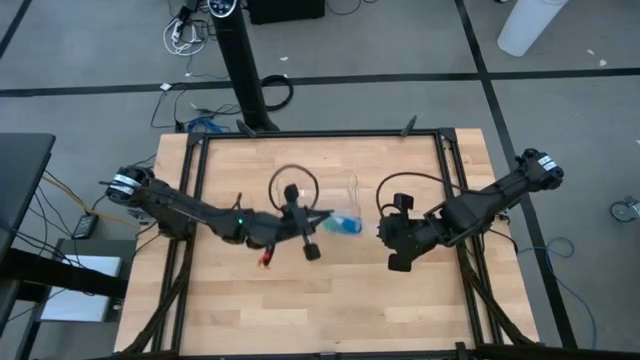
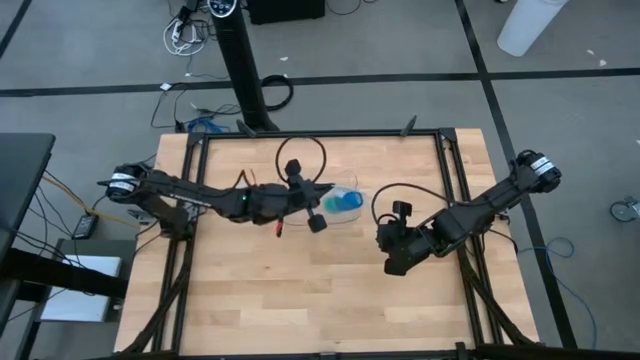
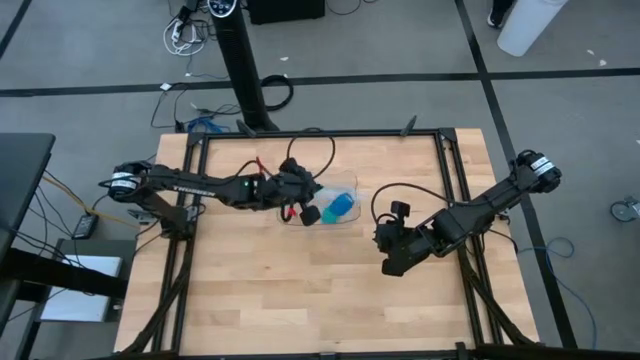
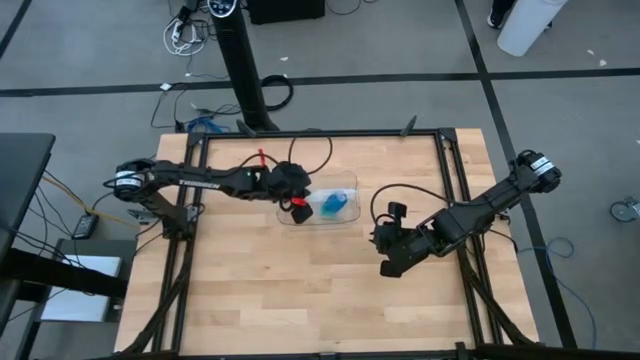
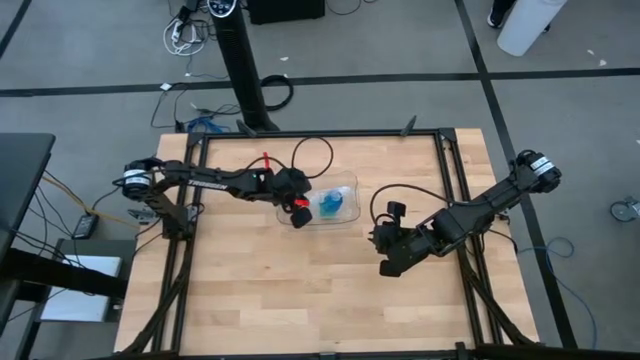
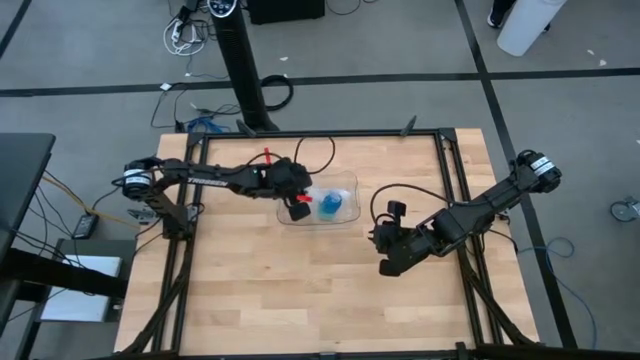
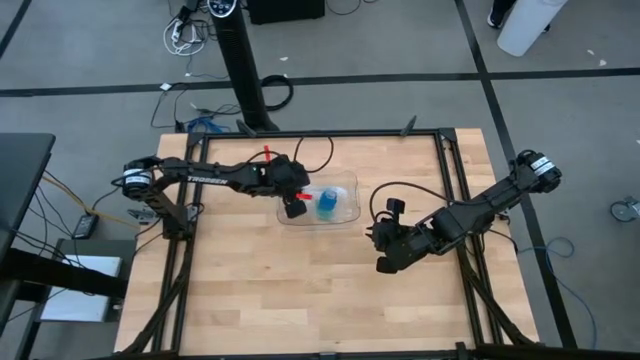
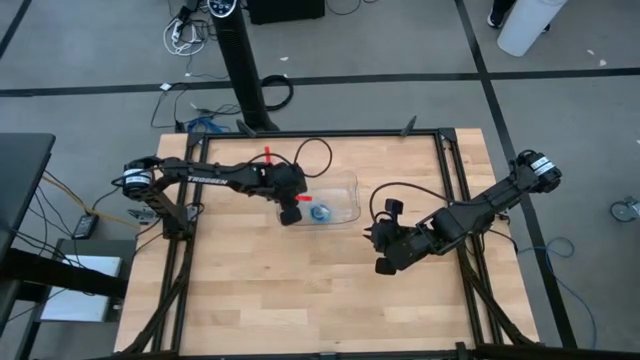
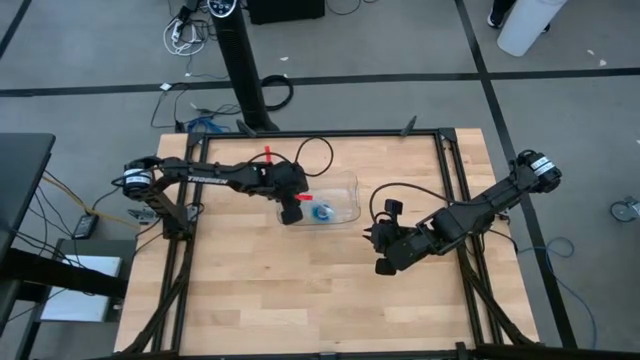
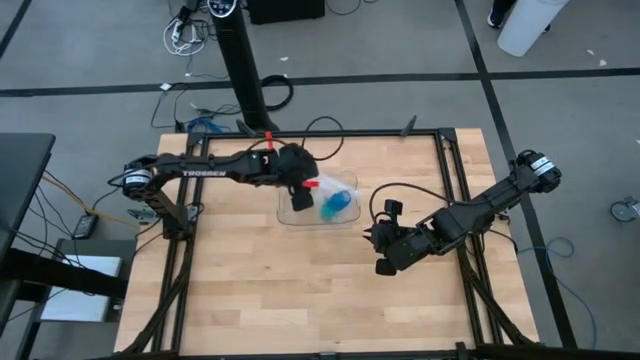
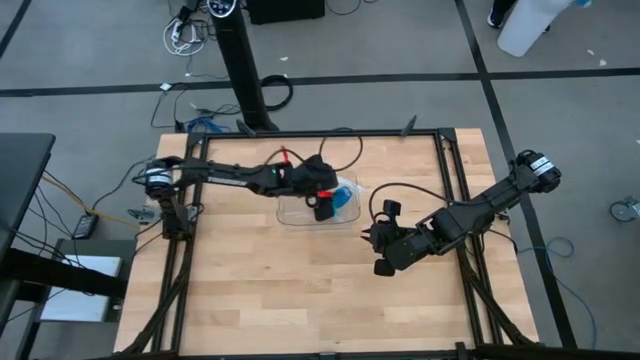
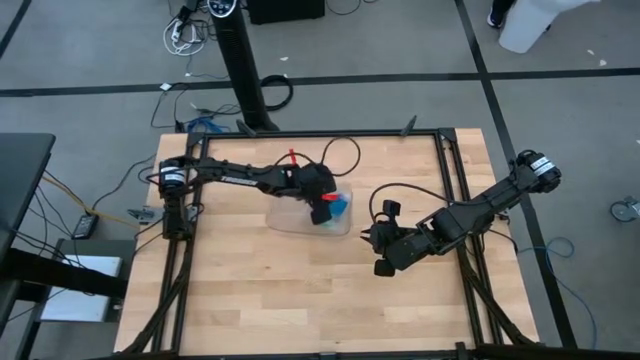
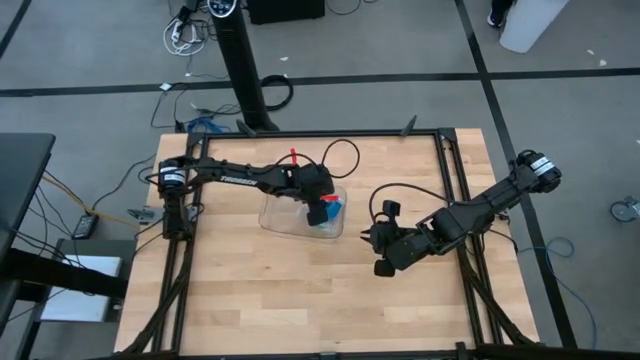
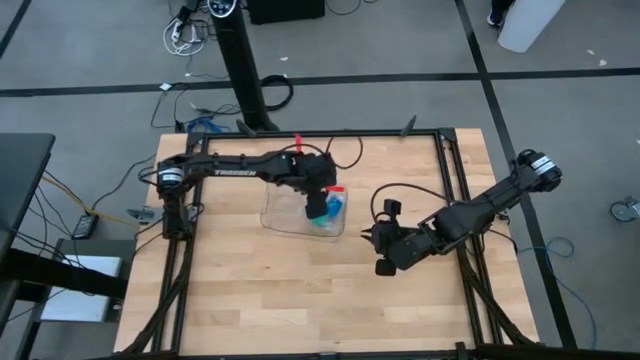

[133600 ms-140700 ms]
Task: Roll bandage
Put the packed blue bandage into the transparent bin

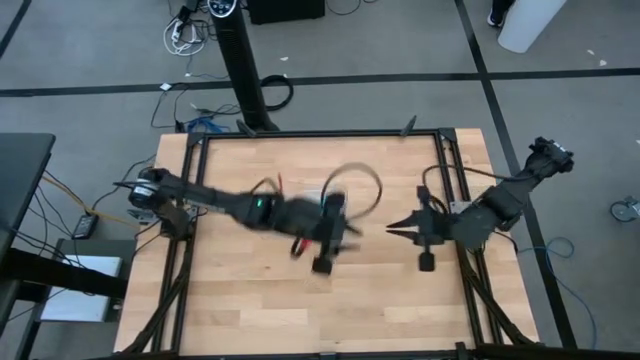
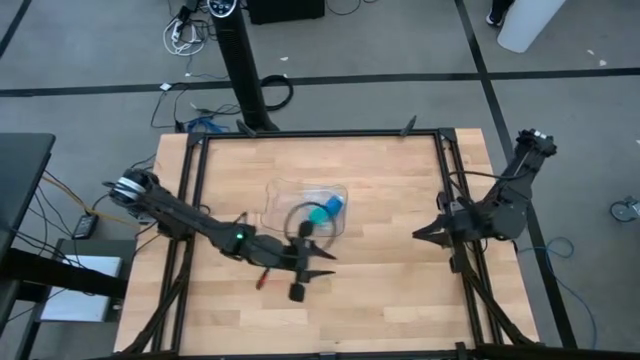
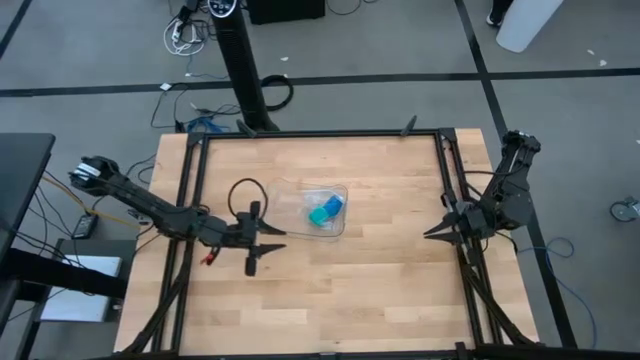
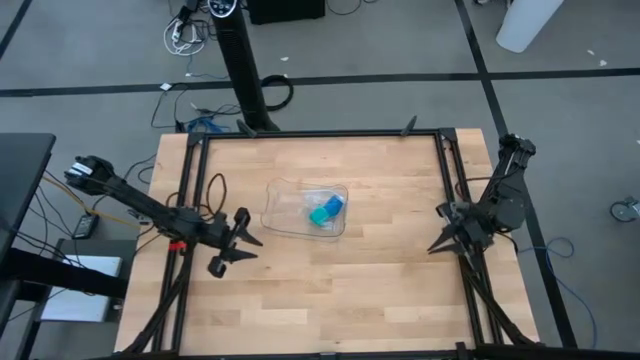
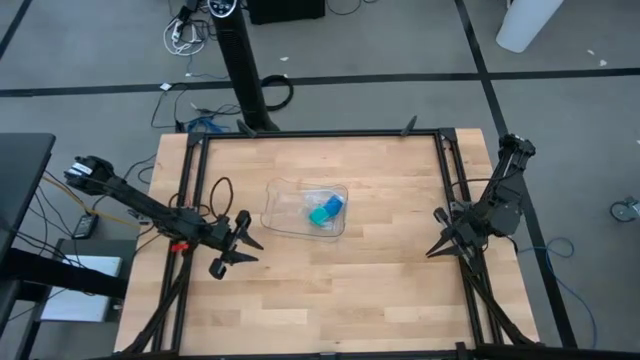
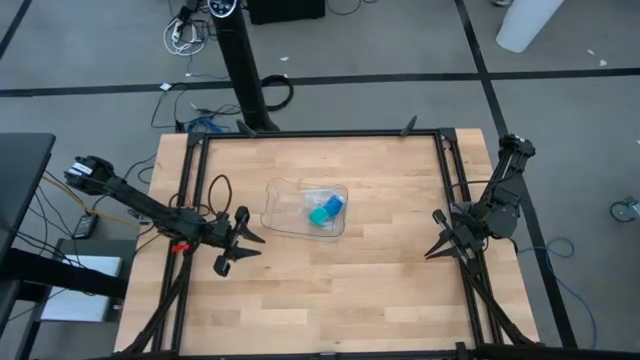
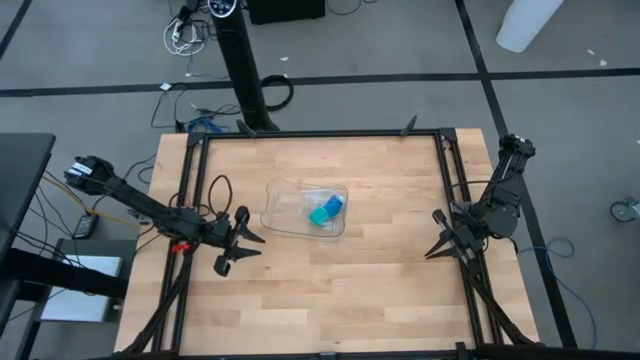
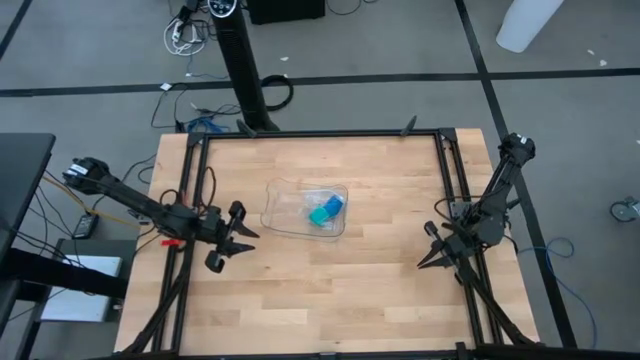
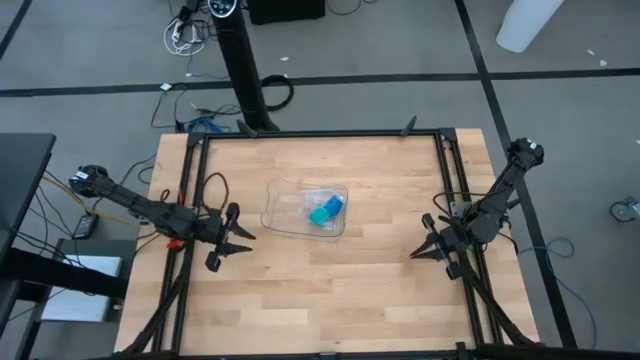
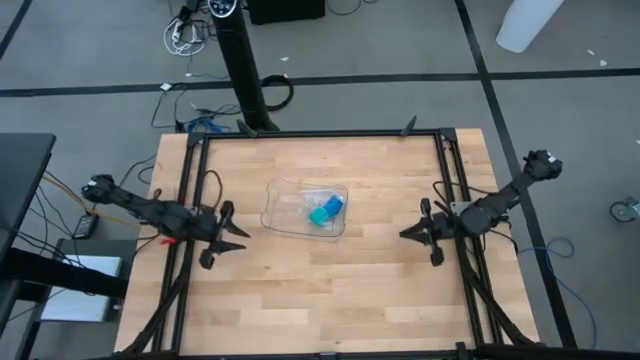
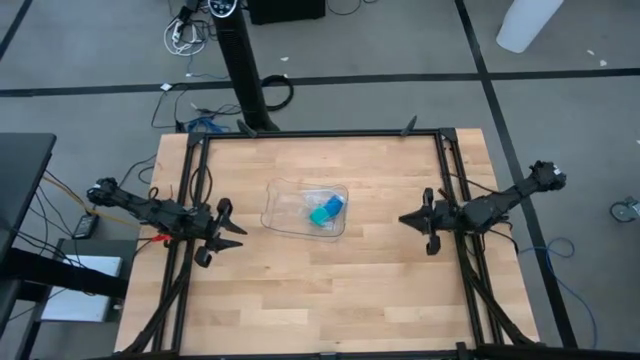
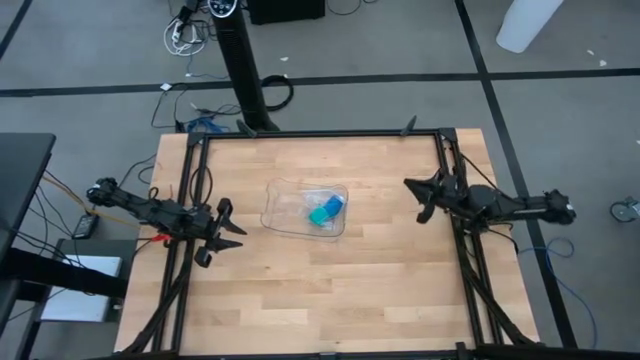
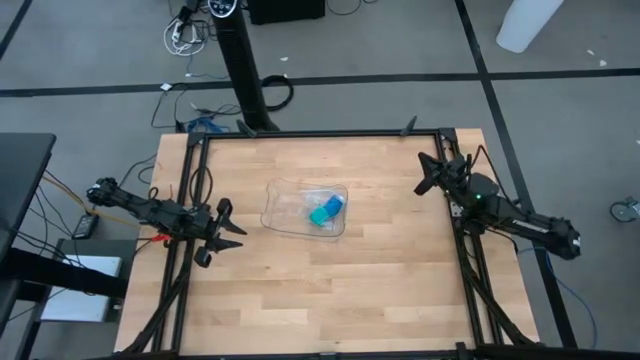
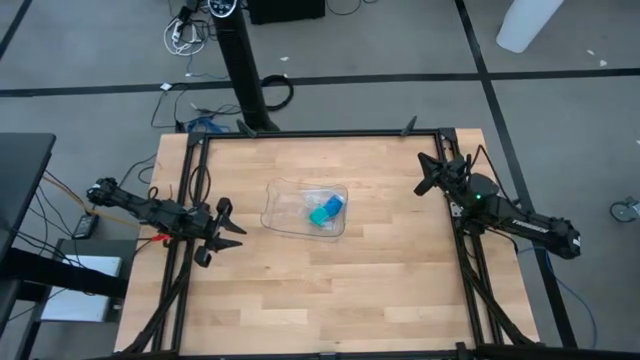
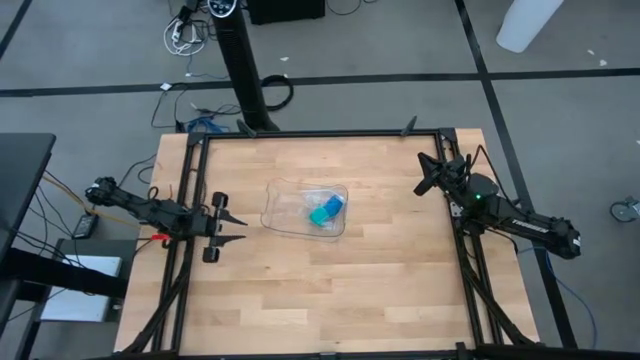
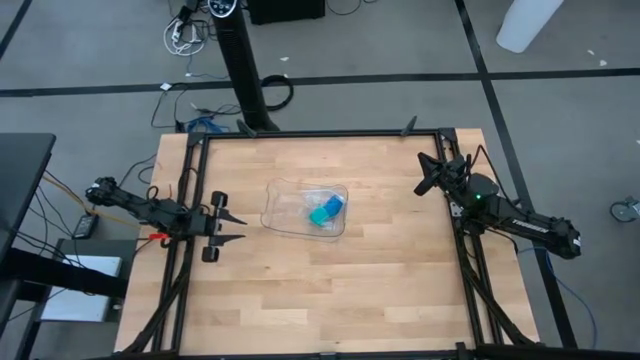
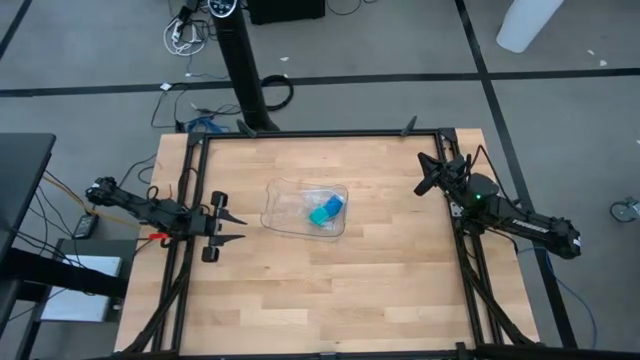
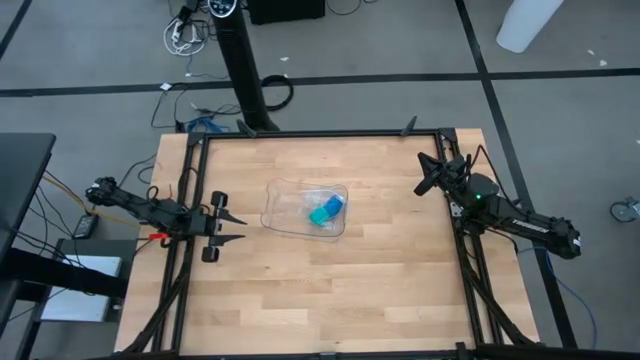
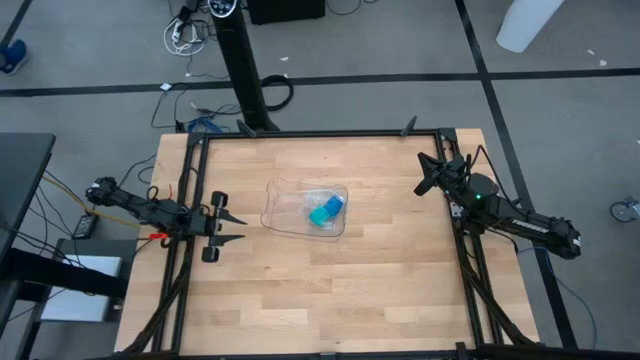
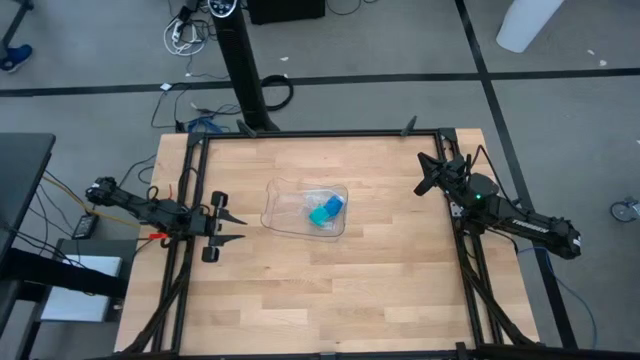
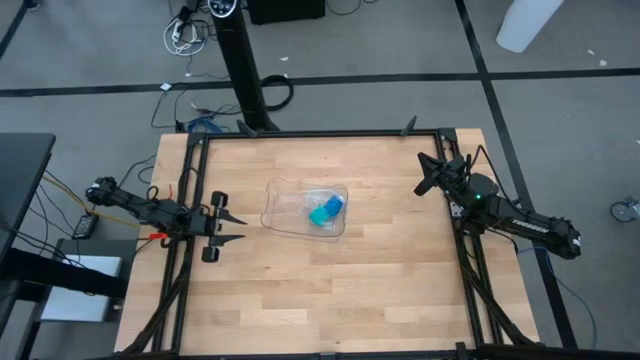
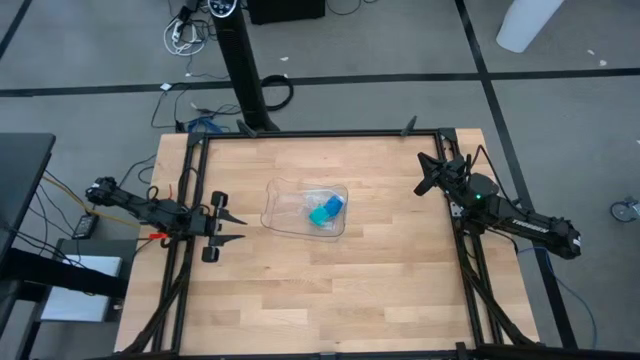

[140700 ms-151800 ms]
Return to Home Position

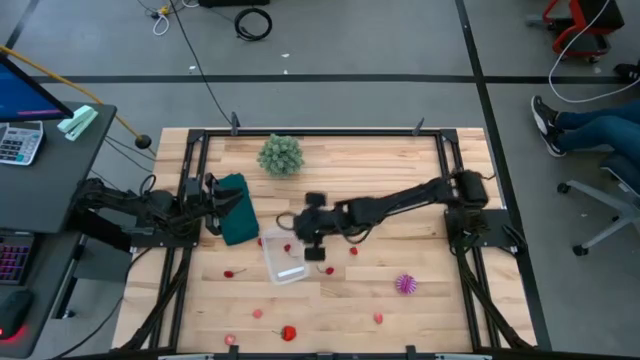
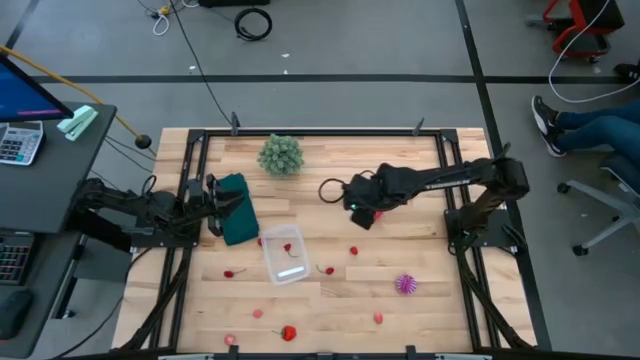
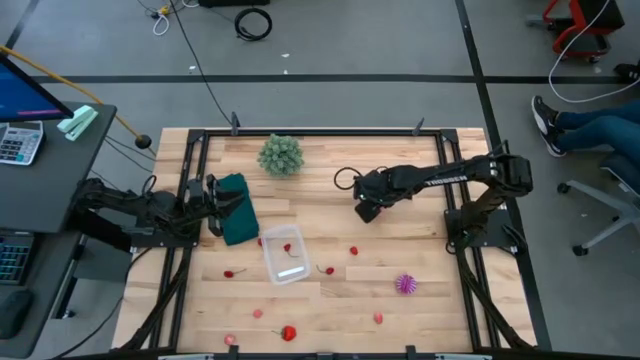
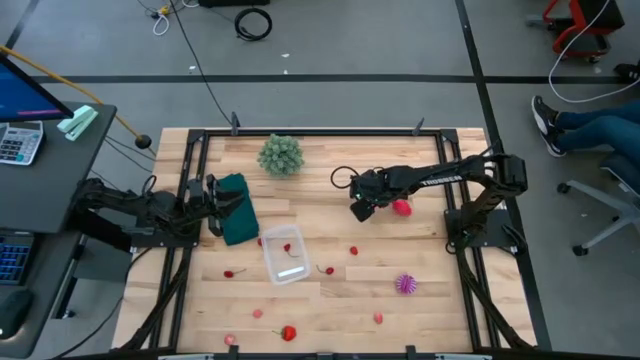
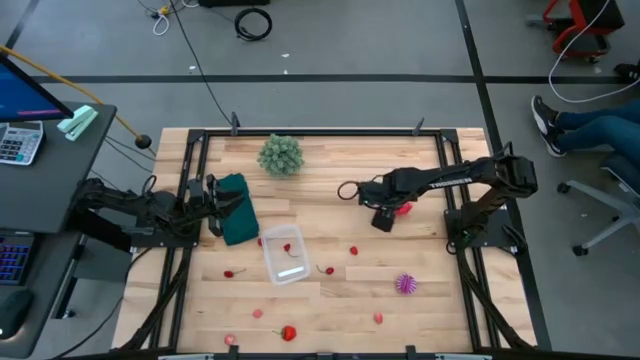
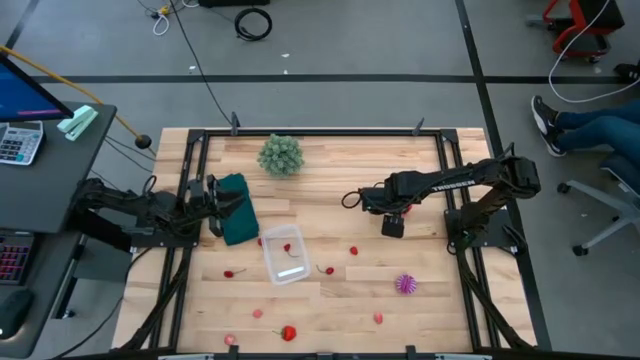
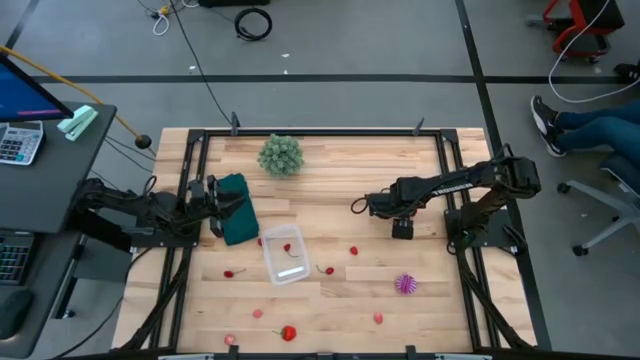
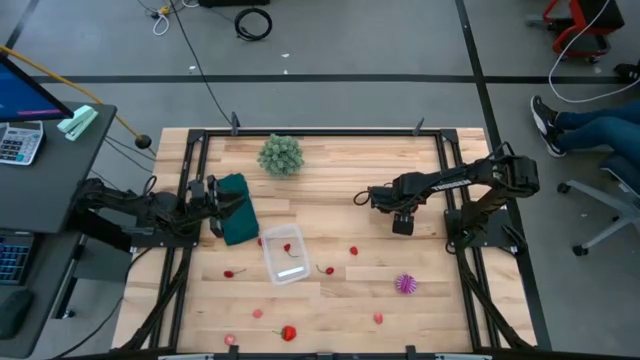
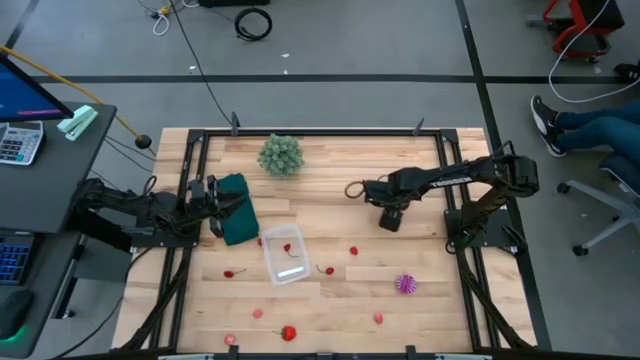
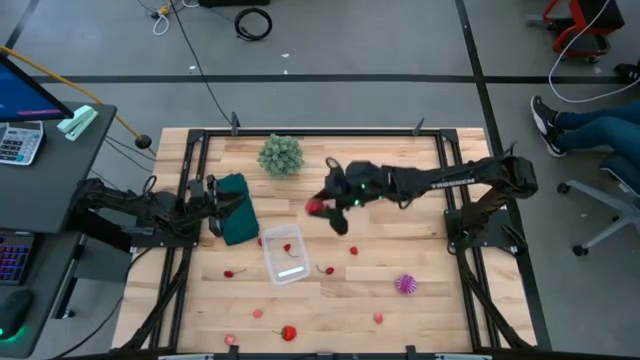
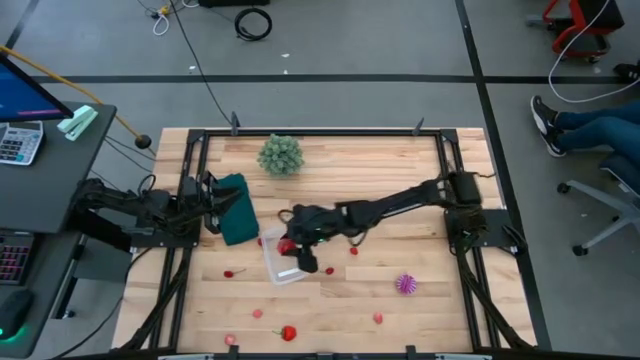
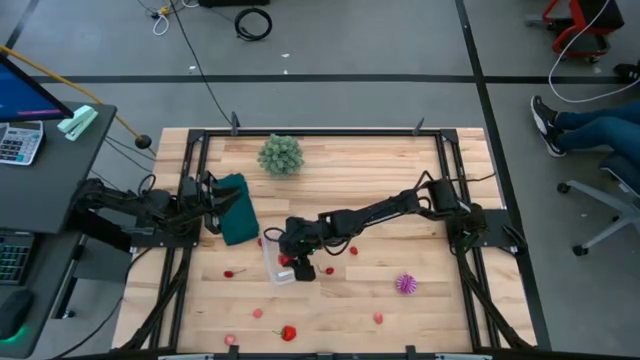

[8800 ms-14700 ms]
Task: Pick and placing Produce into tupperware
Put the red dragon fruit into the transparent bin
